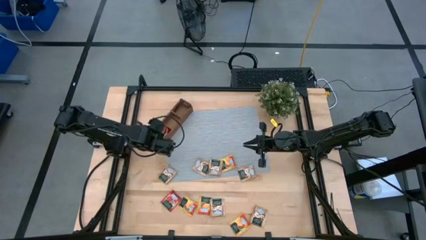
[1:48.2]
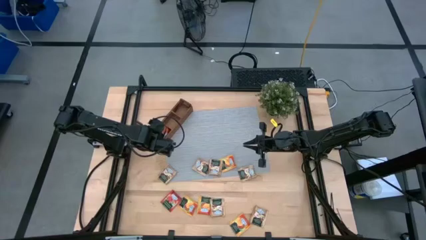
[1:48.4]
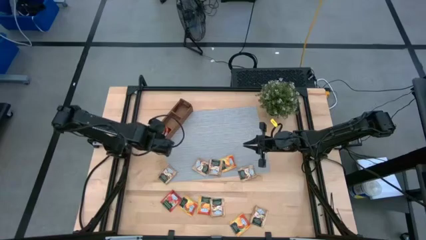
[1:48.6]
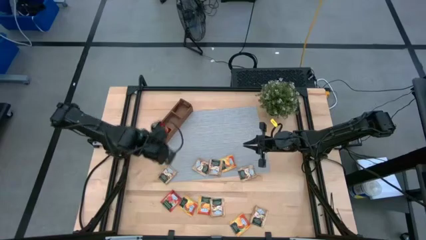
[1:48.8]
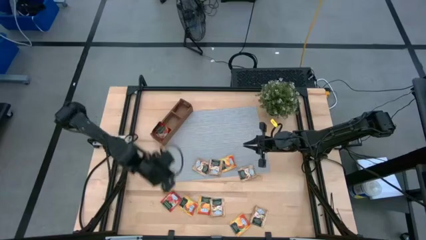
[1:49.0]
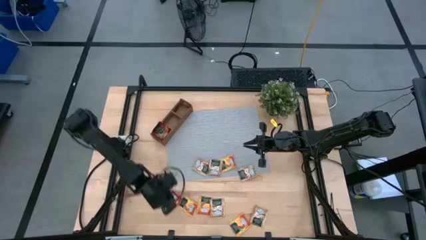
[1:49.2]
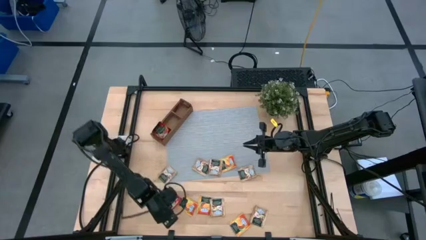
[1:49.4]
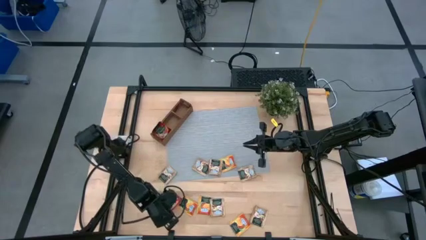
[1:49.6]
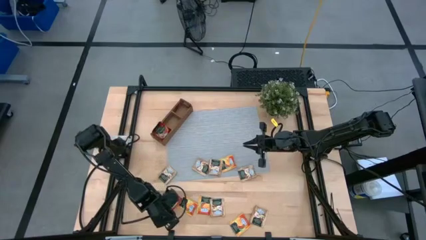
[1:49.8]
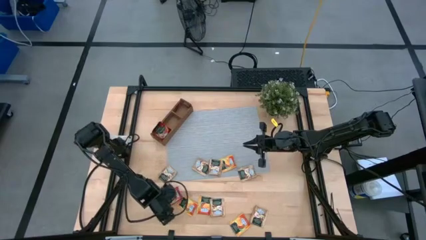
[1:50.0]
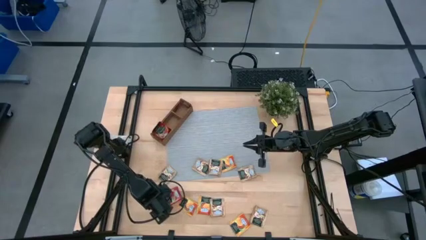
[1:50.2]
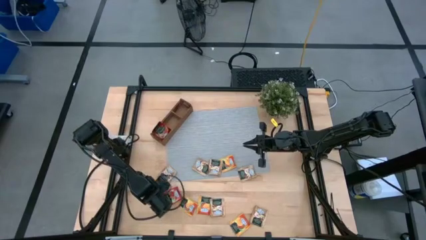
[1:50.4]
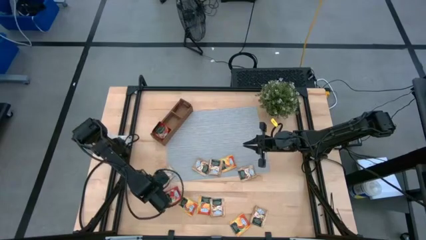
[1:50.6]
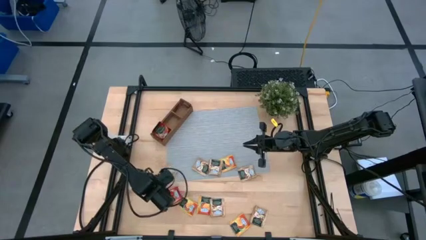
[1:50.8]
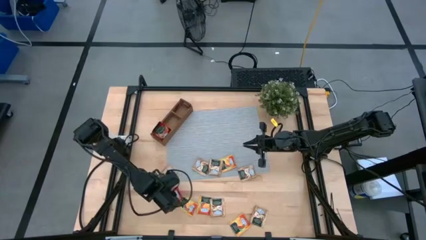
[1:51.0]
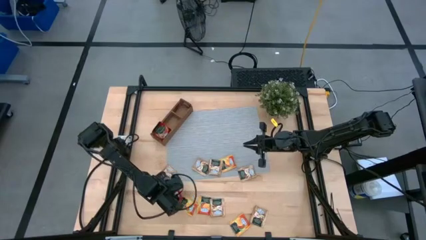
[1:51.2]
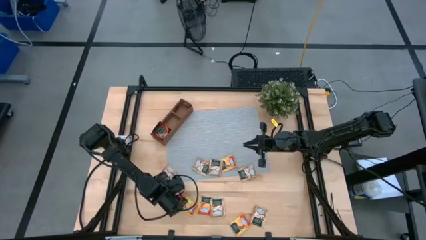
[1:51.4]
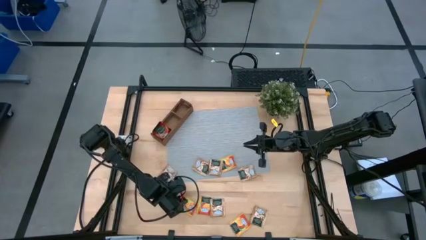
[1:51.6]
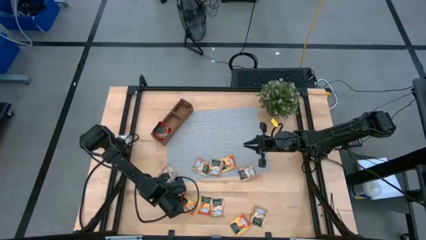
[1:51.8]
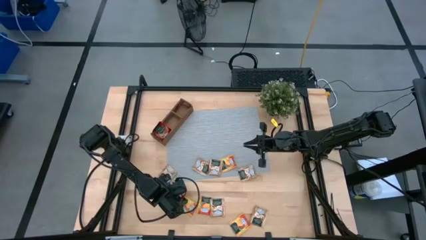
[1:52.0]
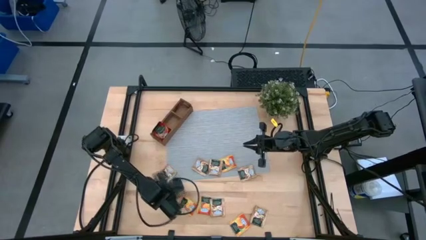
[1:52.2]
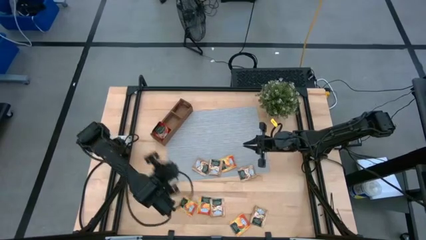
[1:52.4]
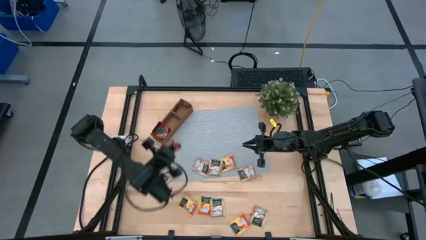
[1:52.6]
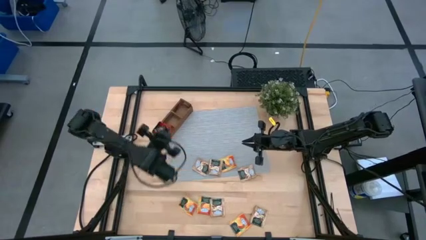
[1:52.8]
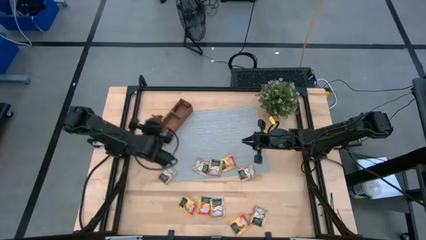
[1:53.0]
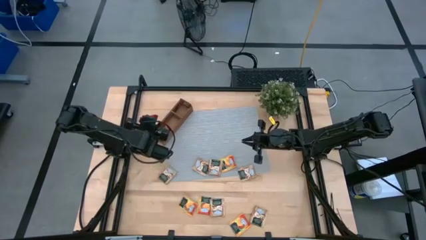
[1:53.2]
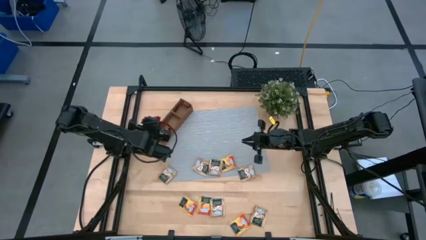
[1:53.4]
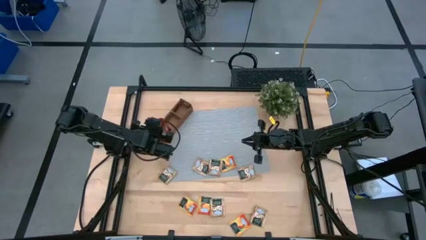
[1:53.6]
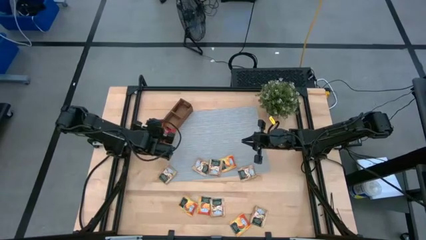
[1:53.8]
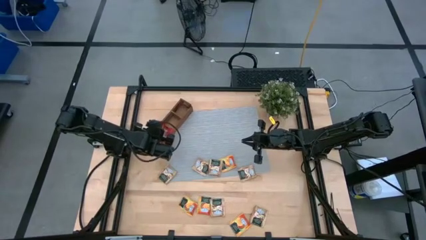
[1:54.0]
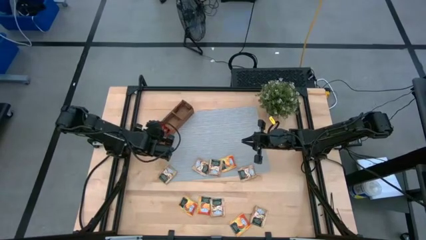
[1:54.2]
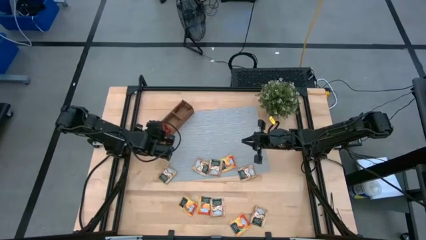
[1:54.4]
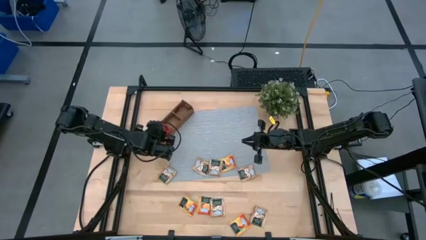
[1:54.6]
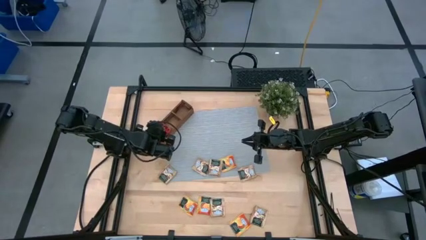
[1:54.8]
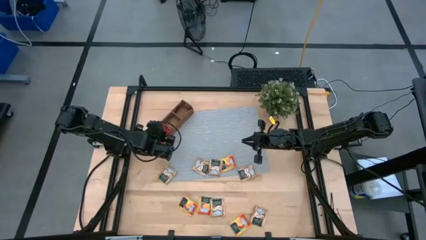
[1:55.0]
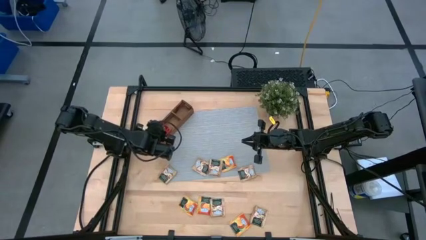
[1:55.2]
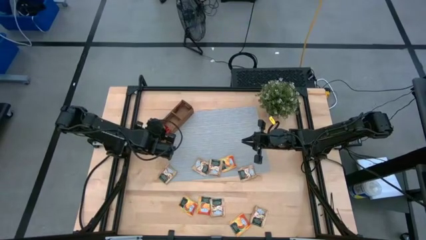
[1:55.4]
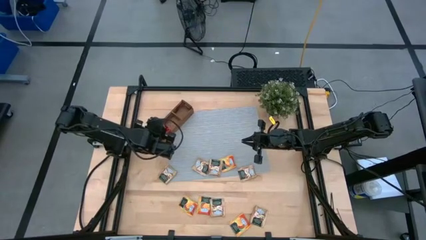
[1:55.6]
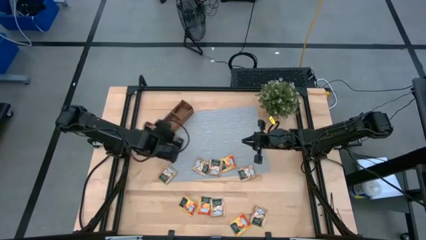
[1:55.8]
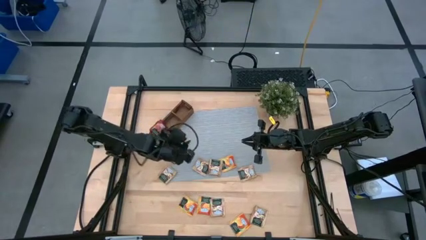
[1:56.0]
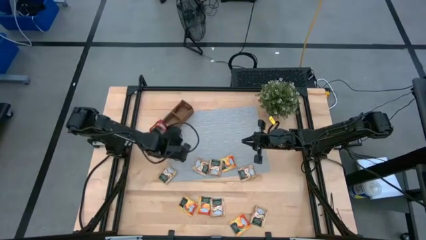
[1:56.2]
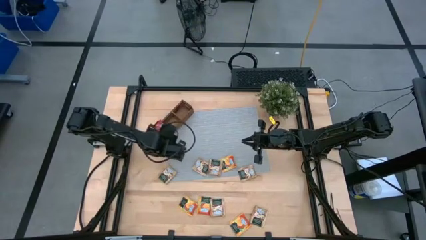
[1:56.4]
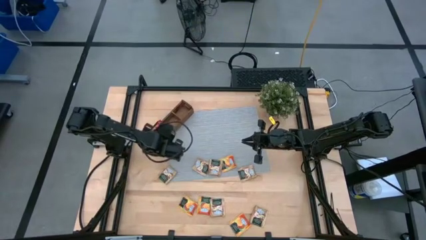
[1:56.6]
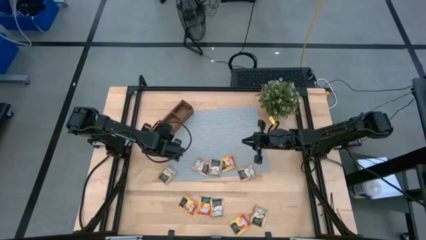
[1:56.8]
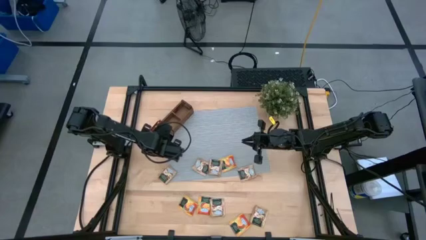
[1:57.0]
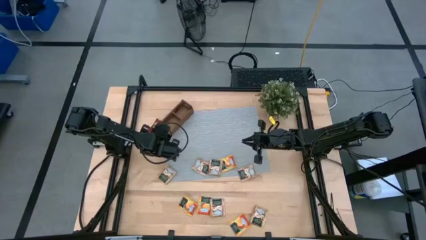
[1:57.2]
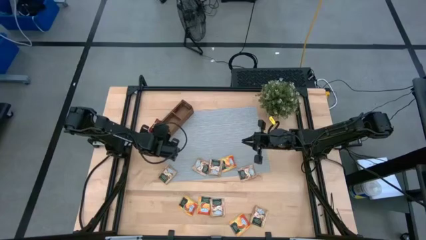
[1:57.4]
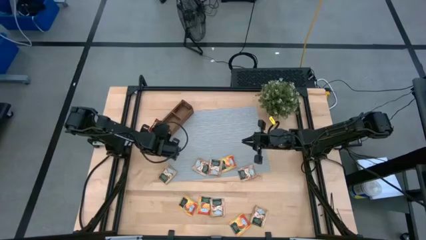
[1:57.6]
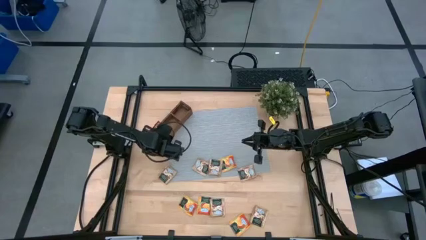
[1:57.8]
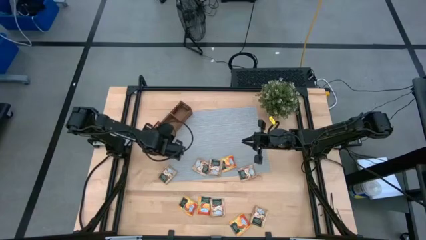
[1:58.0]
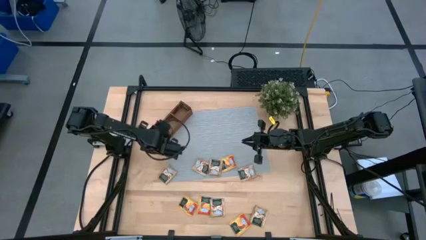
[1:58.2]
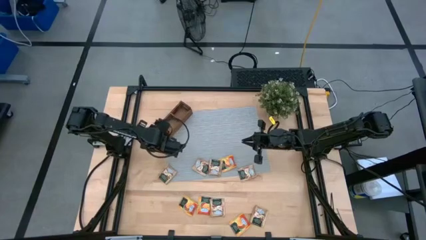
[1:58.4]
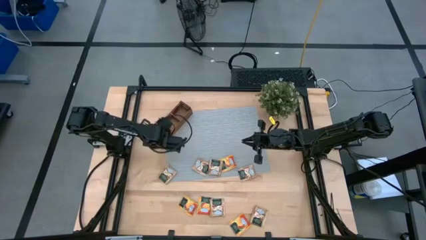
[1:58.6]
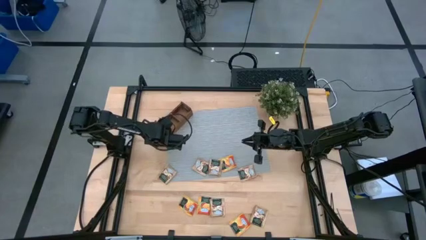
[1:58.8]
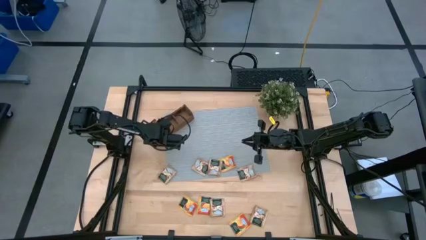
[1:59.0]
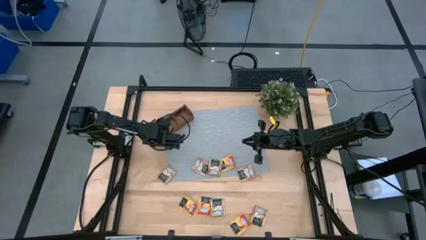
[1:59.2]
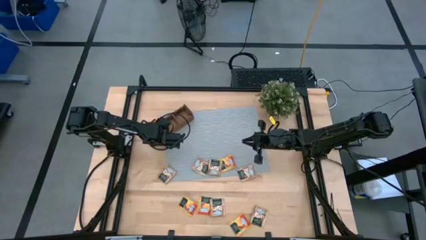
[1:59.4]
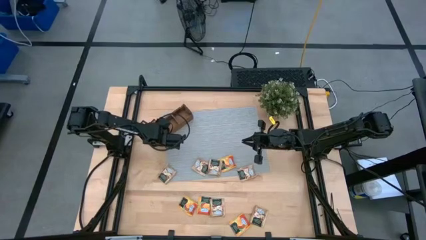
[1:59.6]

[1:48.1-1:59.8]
Task: Pick & Place Tea
Put the red tea bag into the left section of the wooden organizer

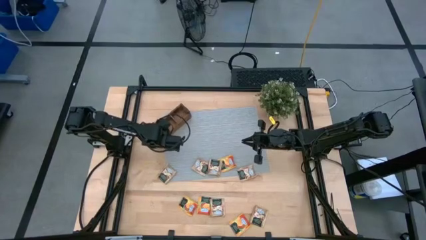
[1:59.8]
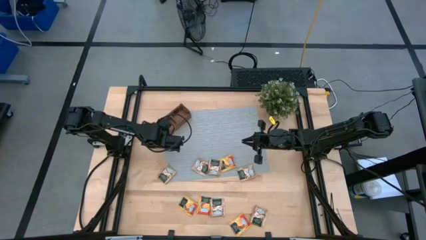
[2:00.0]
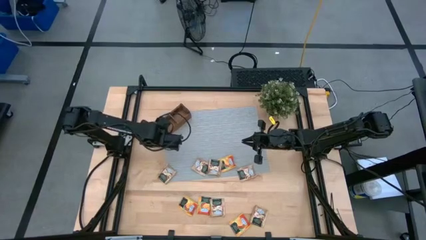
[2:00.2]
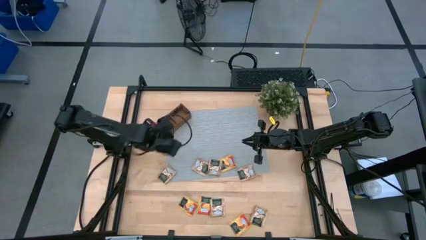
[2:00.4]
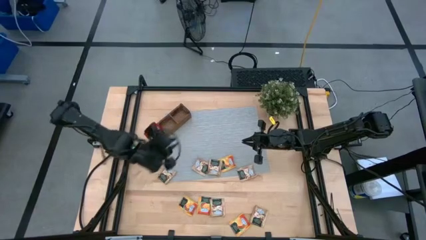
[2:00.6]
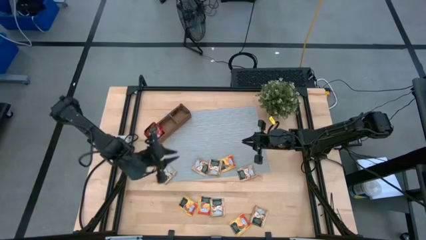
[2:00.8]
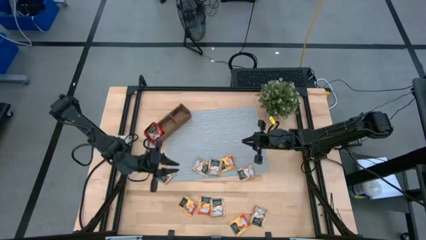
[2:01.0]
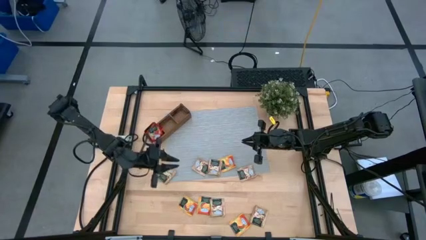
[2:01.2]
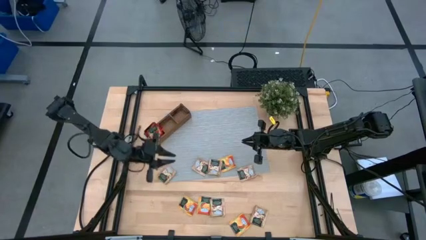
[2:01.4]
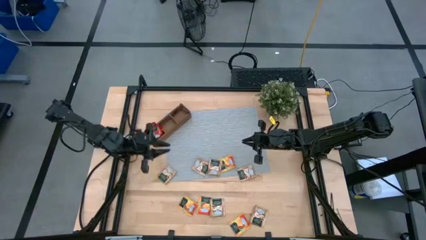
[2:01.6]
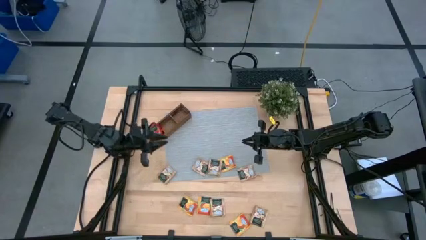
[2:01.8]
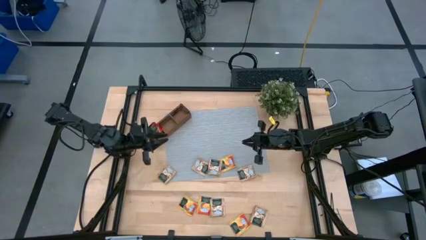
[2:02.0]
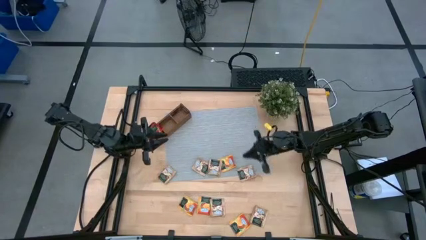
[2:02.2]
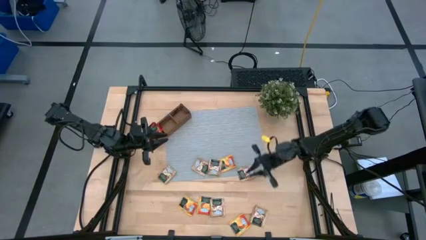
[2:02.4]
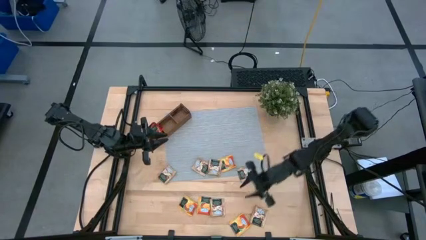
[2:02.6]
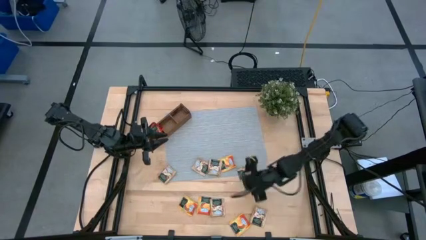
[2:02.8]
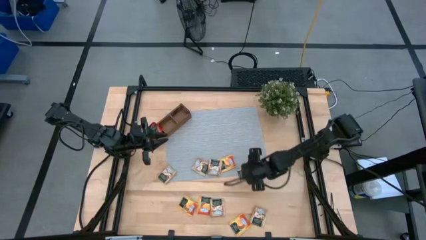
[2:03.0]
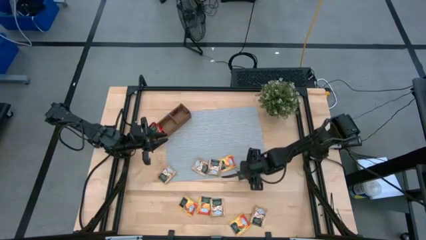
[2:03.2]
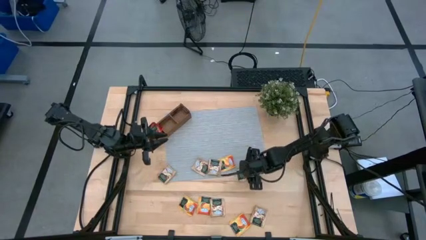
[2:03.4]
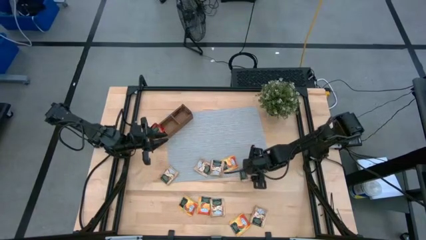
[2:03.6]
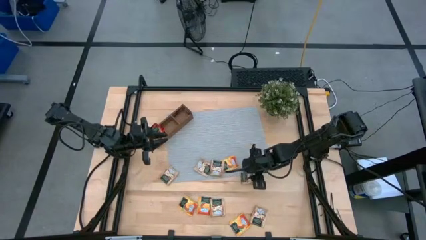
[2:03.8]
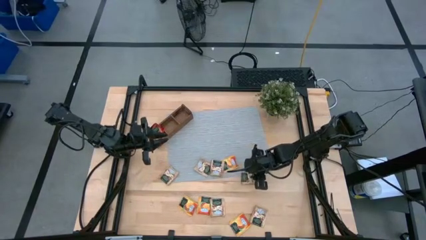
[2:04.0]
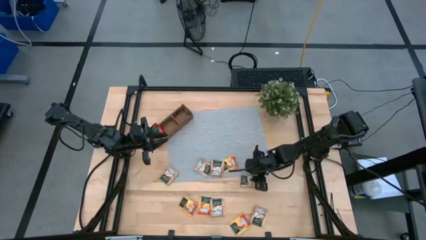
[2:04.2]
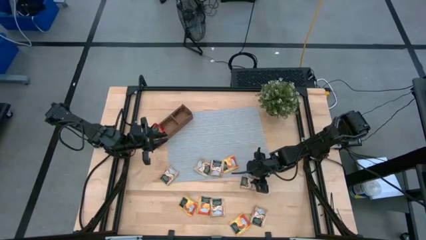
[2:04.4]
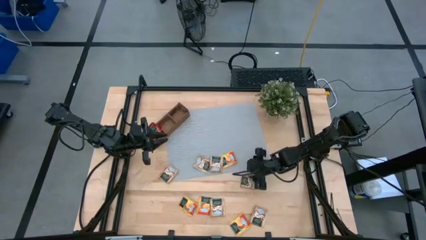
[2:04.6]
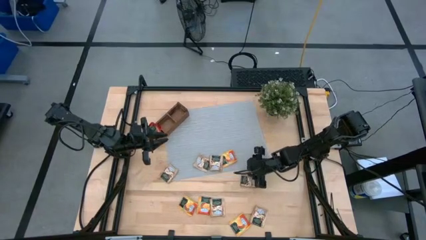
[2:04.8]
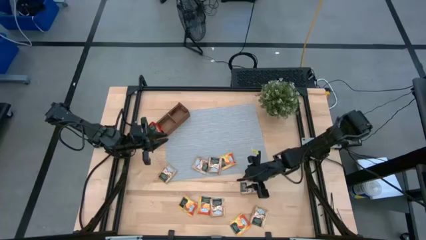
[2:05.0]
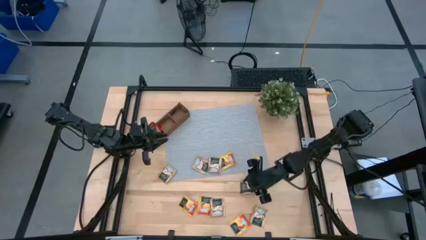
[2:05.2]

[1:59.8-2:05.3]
Adjust the brown tea bag on the table
